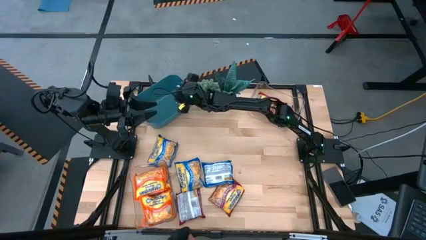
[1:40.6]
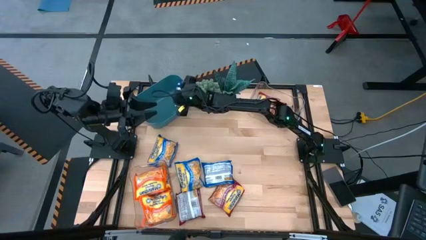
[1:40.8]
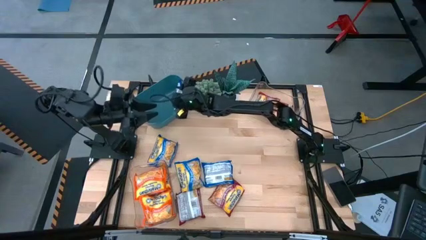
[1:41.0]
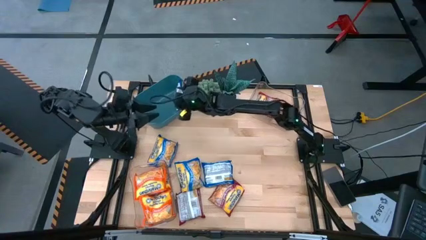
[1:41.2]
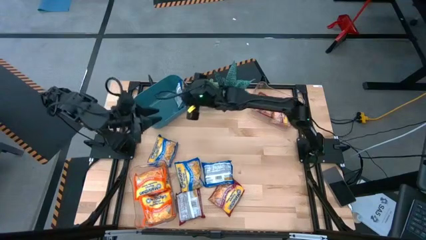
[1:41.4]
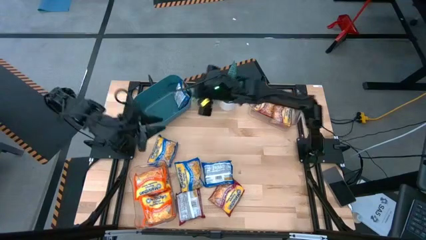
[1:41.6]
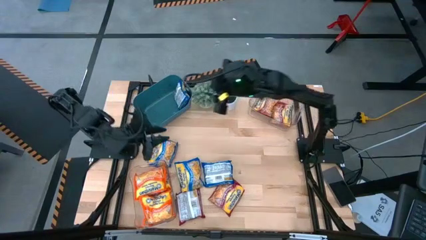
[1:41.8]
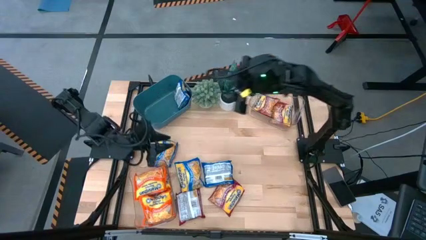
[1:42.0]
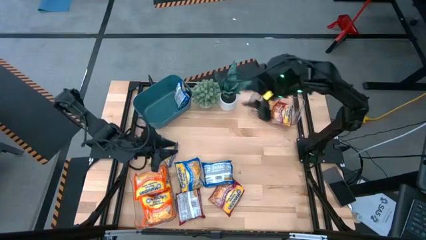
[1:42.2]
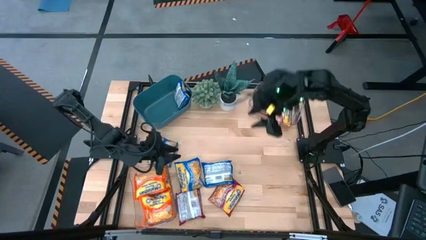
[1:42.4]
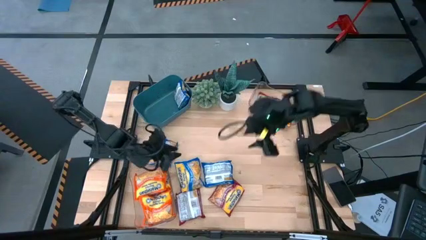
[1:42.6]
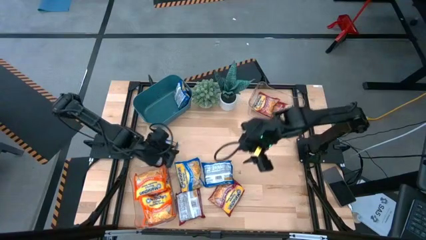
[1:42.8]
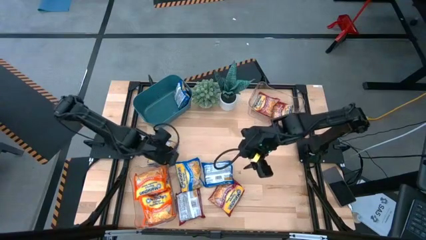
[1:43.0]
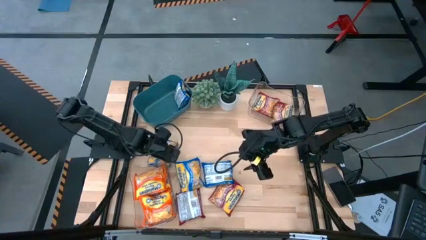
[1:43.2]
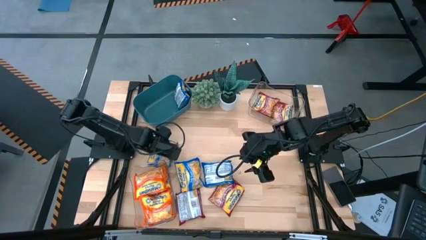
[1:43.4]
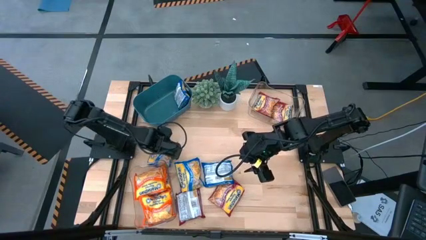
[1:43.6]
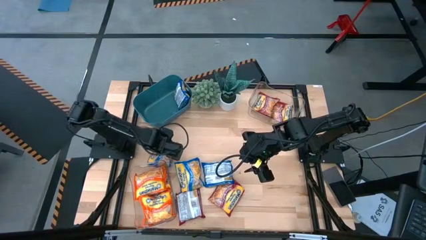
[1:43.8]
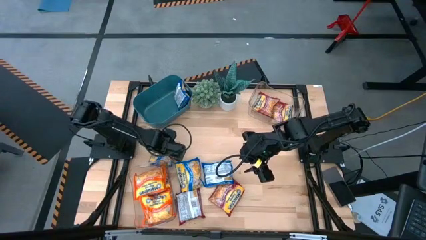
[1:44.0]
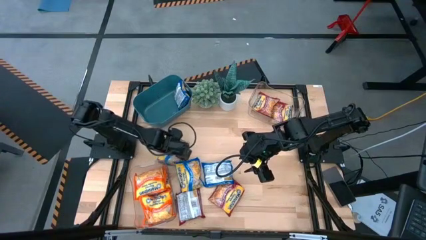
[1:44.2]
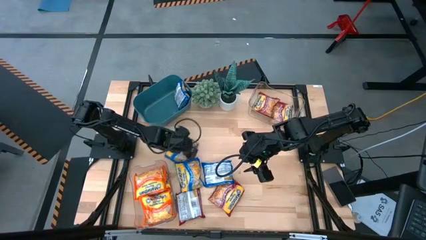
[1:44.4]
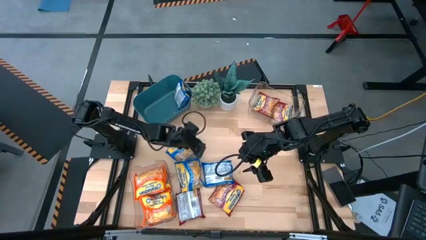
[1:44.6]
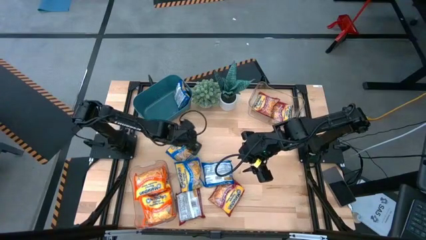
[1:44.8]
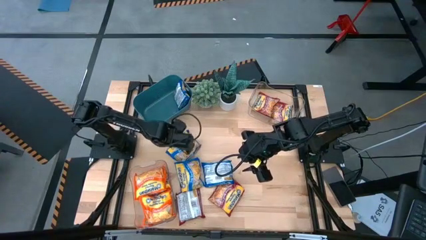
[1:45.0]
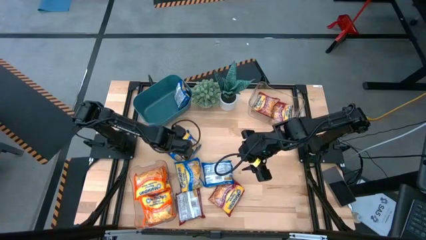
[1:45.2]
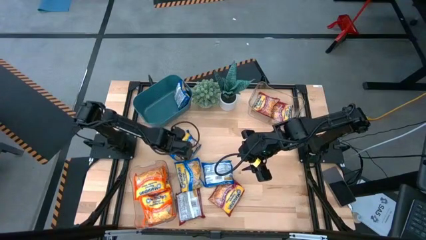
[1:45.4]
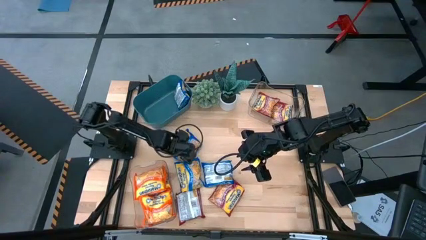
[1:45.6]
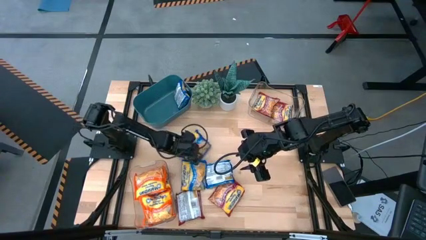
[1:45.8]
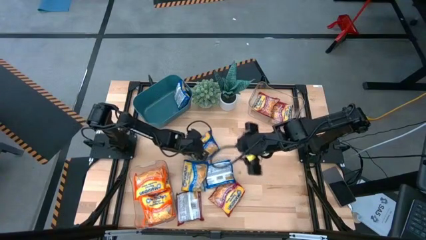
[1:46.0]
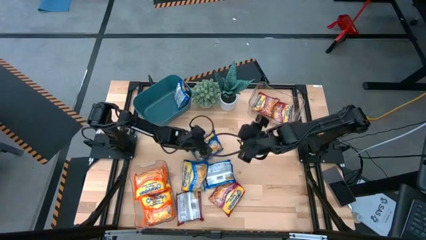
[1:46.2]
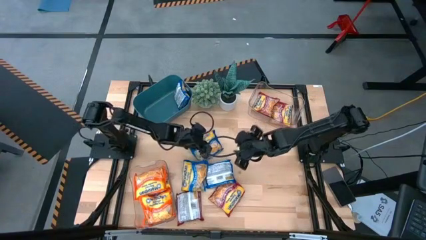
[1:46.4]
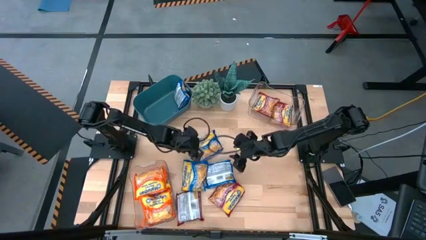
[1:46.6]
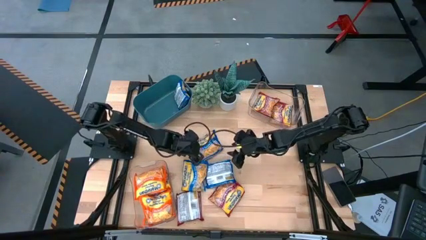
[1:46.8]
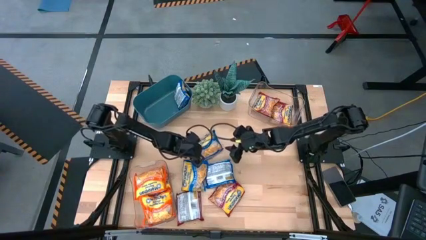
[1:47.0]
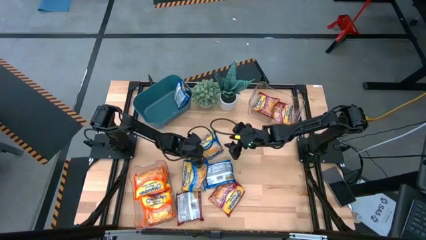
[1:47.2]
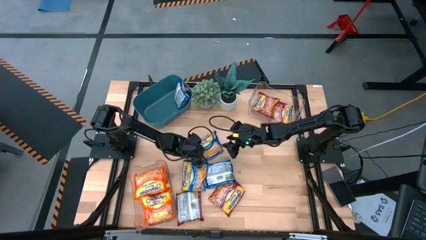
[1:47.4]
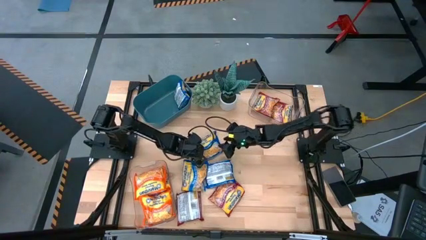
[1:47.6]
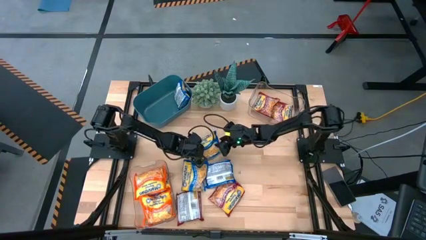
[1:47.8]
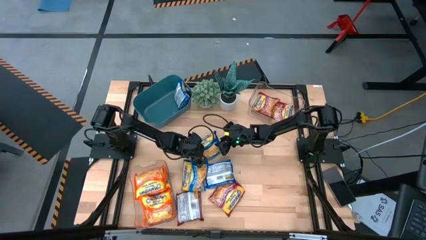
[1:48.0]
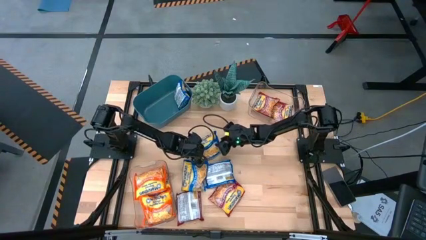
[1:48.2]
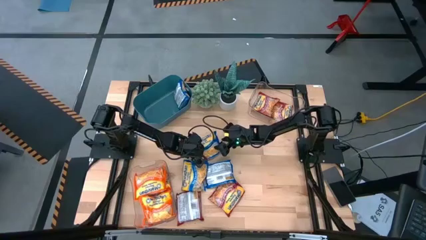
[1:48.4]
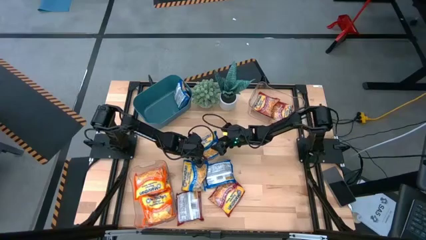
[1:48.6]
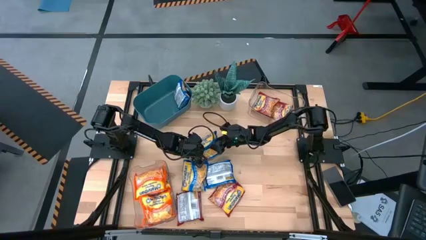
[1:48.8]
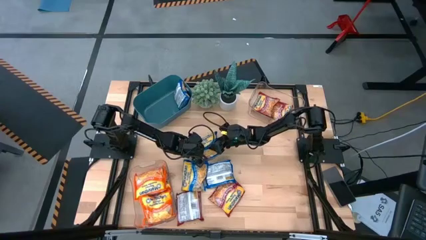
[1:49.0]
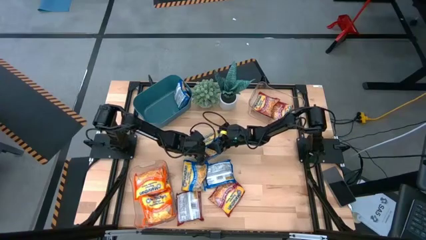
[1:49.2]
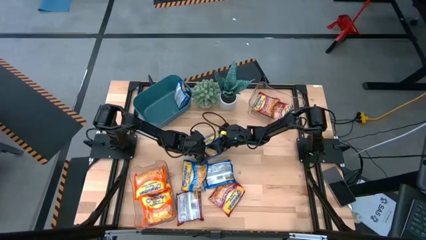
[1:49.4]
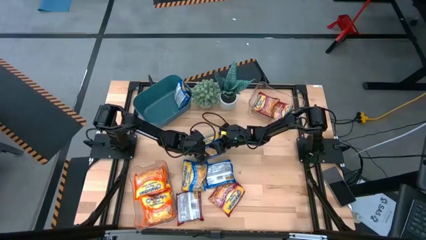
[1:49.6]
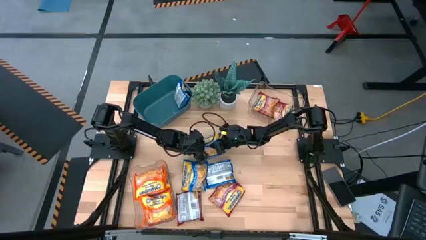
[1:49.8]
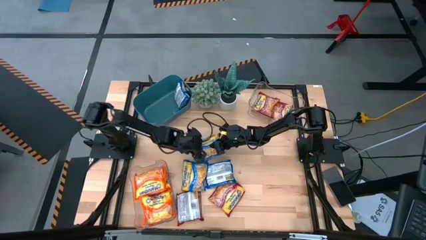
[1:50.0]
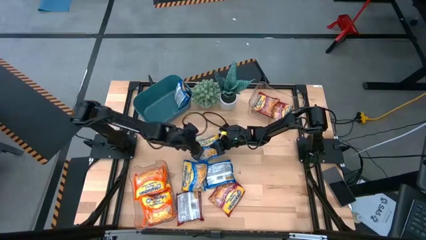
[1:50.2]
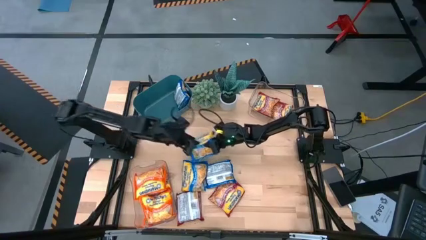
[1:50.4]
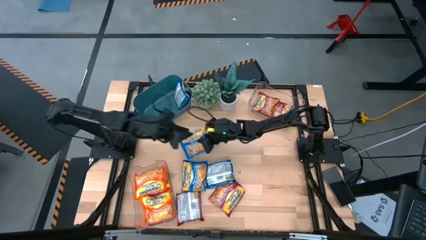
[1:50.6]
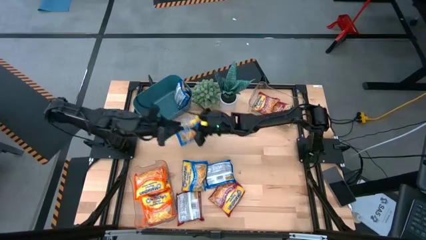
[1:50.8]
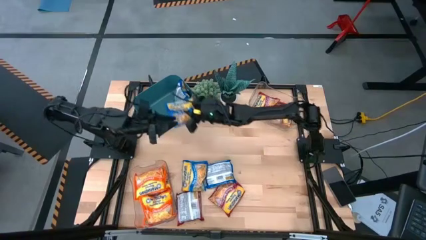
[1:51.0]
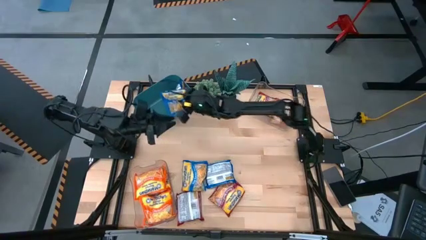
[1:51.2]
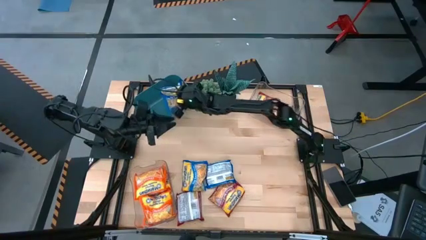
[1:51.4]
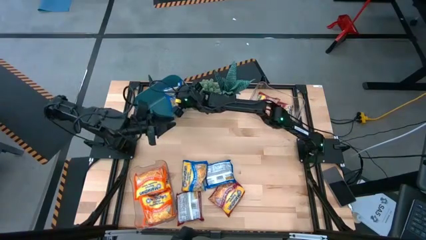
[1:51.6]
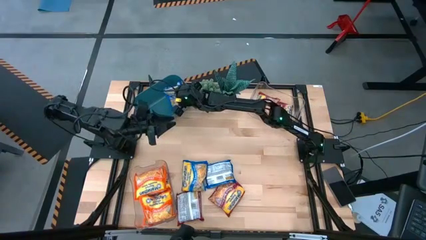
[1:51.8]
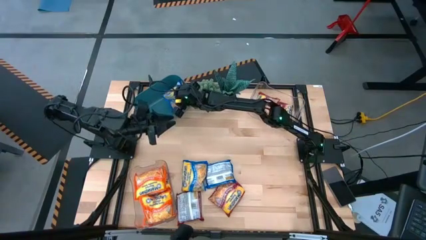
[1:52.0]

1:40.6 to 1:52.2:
Task: Sort Maruchan noodles
Put the blue noodle pack into the green bin

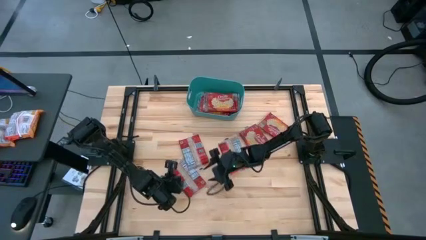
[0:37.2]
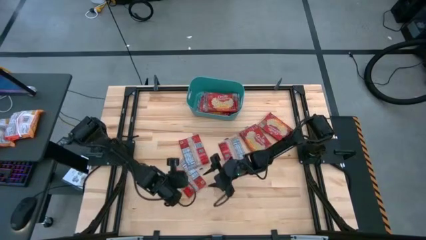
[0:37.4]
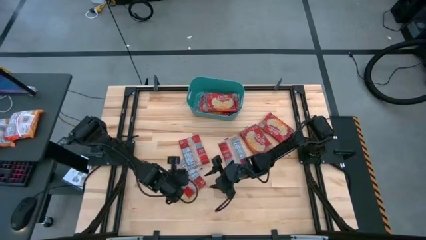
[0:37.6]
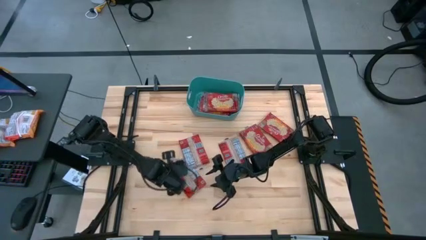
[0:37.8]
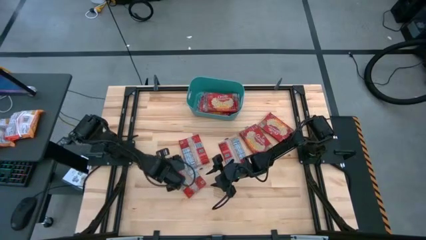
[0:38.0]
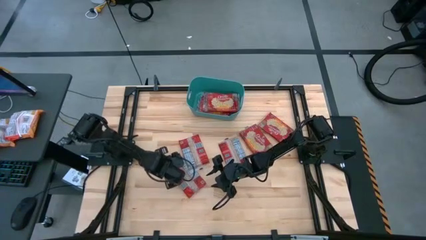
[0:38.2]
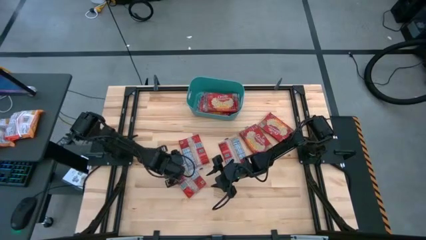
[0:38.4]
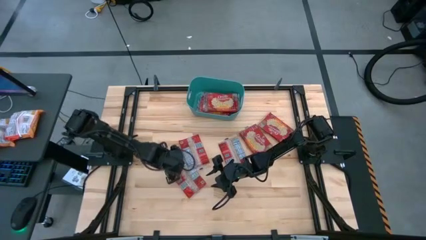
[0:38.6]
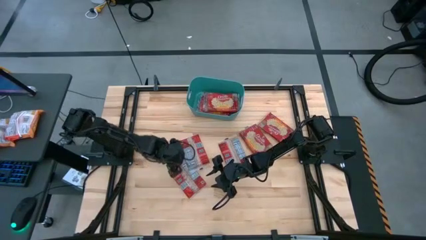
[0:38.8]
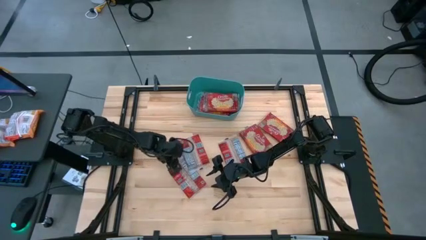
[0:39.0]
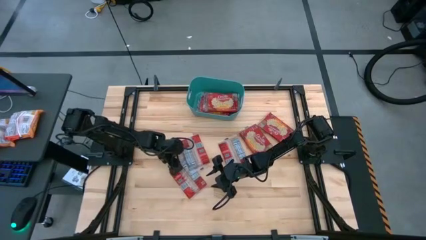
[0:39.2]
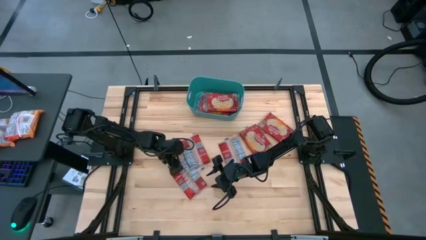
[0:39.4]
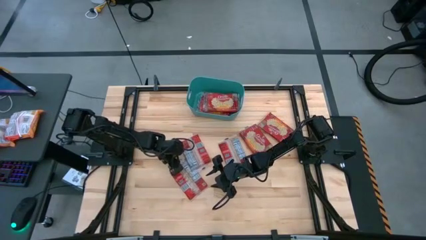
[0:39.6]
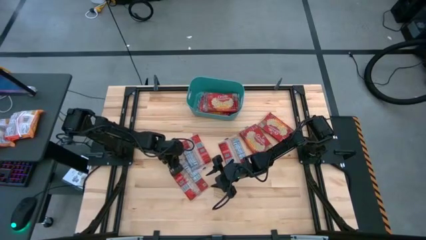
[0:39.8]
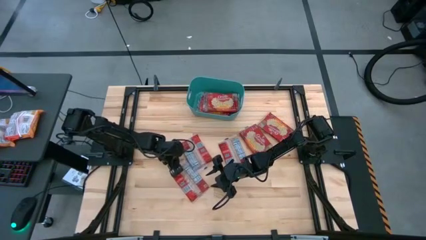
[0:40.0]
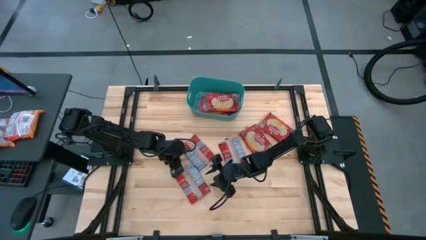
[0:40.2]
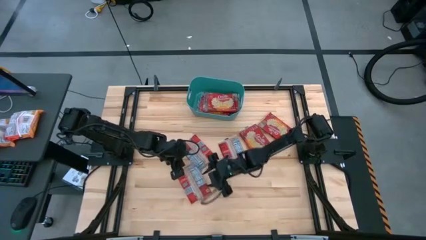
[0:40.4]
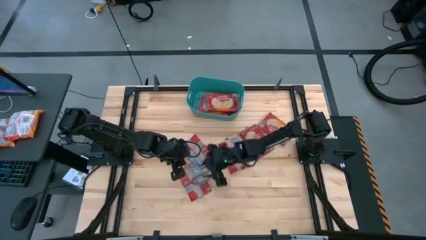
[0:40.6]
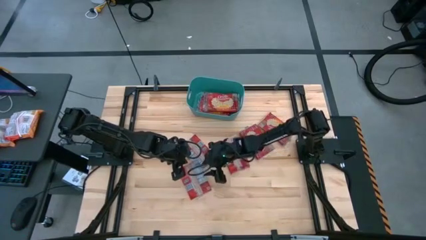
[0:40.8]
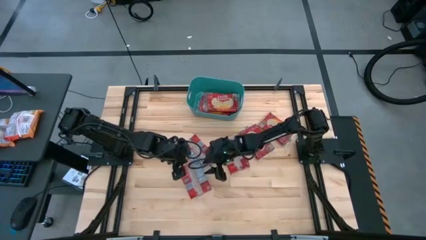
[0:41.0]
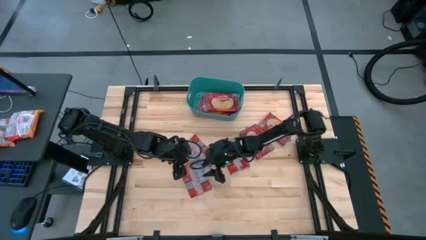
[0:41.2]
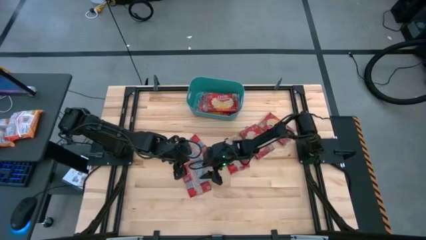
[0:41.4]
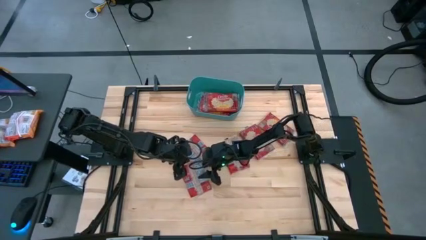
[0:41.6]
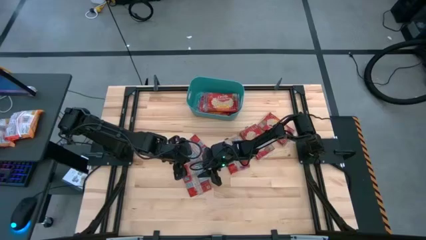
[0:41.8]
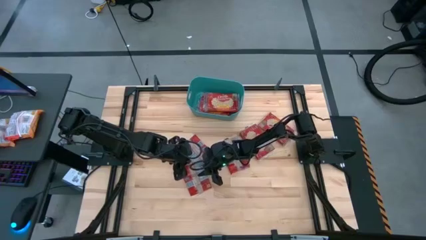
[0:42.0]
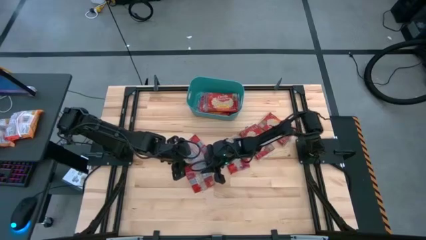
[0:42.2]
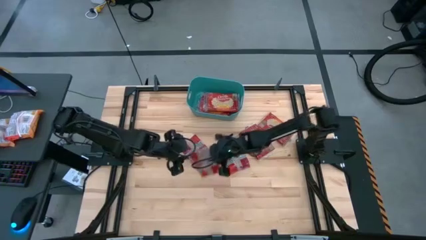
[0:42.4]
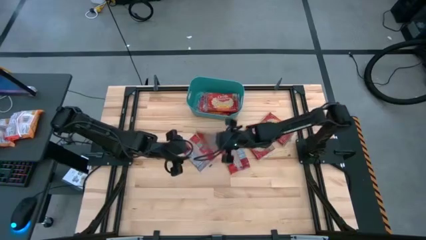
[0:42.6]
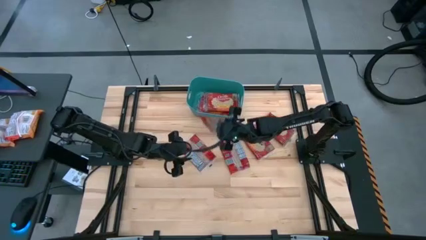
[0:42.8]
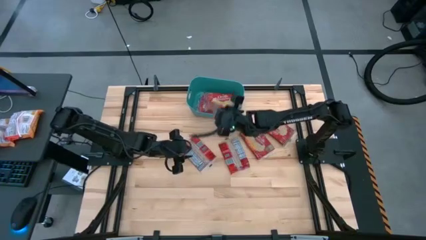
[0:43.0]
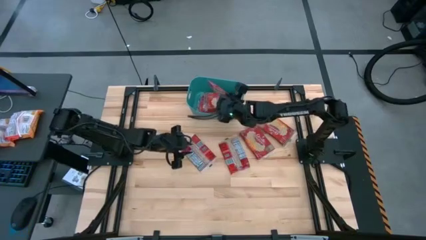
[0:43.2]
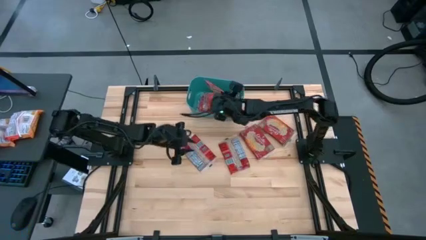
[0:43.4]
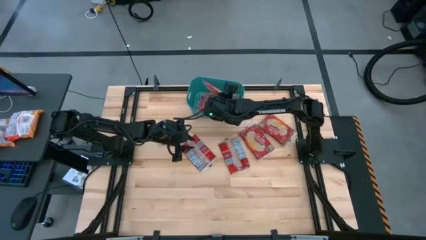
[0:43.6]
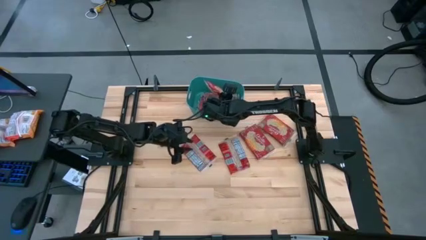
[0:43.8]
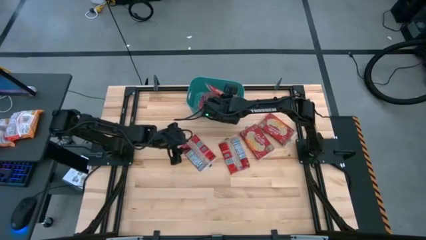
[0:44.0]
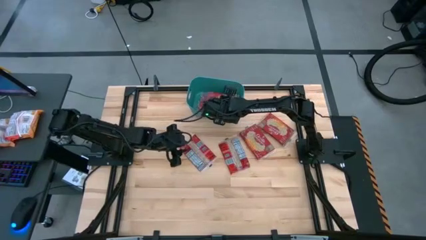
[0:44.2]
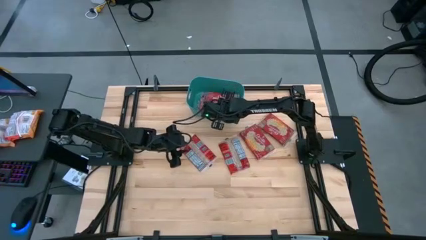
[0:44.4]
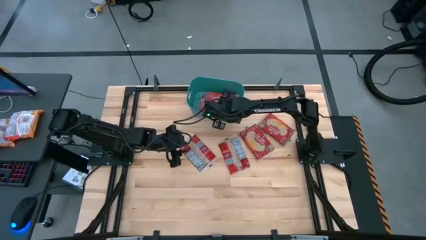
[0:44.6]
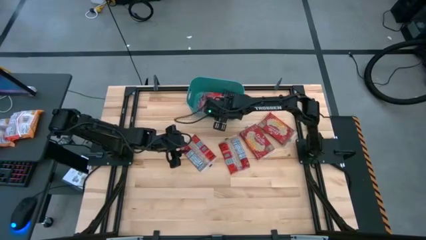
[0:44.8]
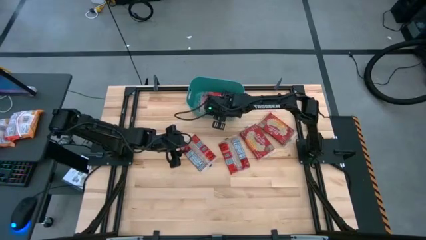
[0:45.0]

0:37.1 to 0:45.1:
Task: Sort popcorn bags into baskets
Put the red popcorn bag into the green bin
